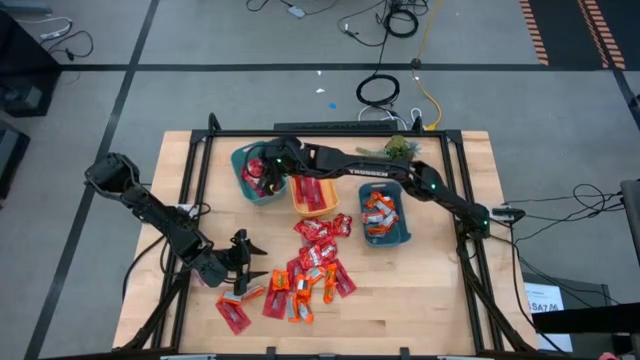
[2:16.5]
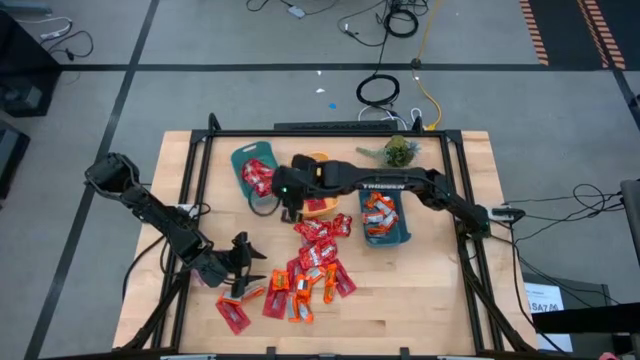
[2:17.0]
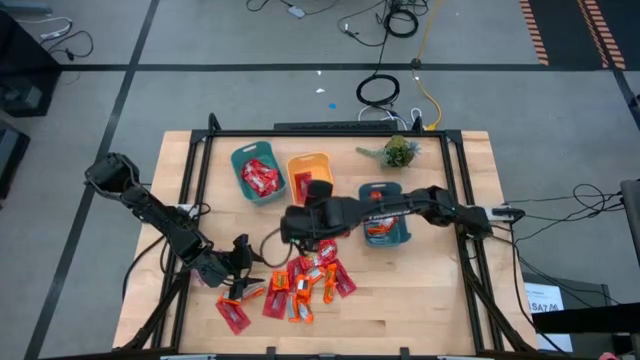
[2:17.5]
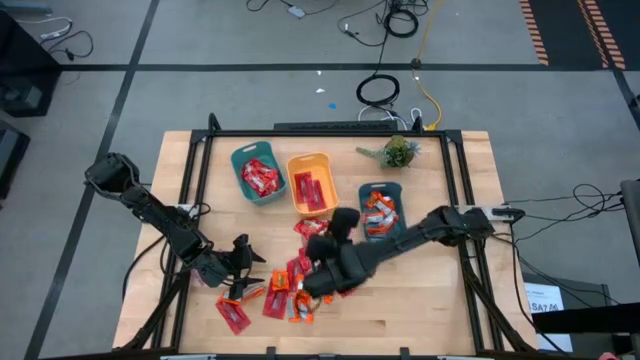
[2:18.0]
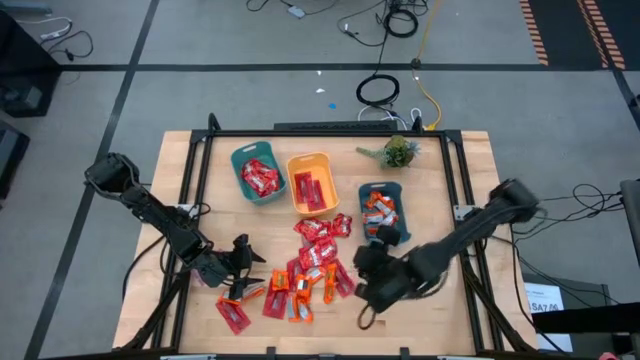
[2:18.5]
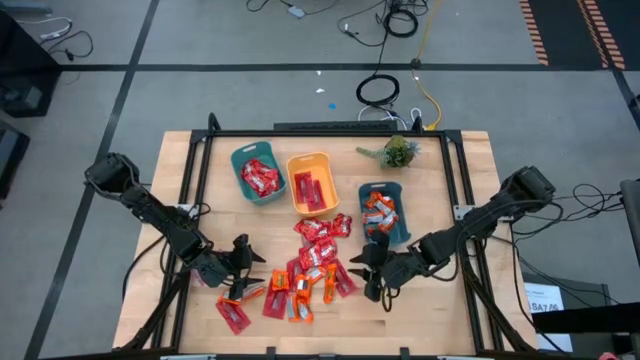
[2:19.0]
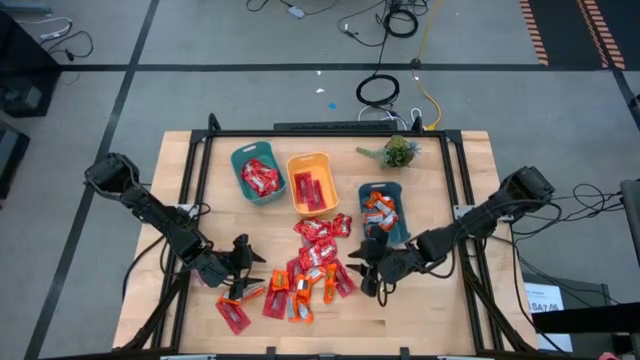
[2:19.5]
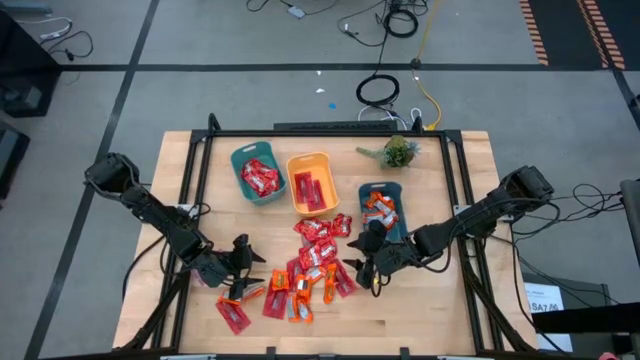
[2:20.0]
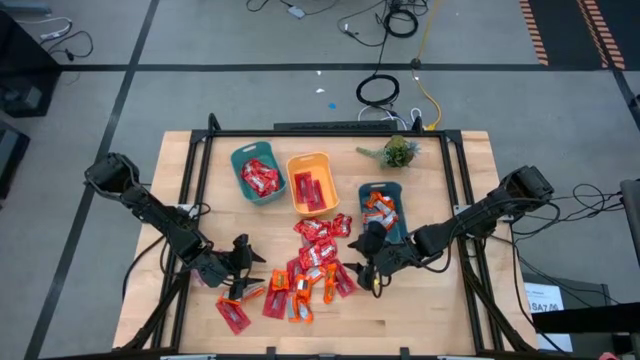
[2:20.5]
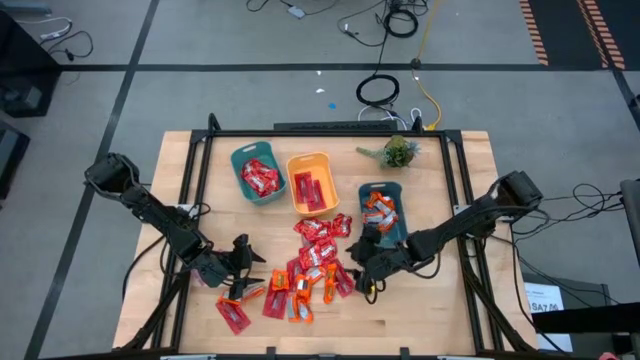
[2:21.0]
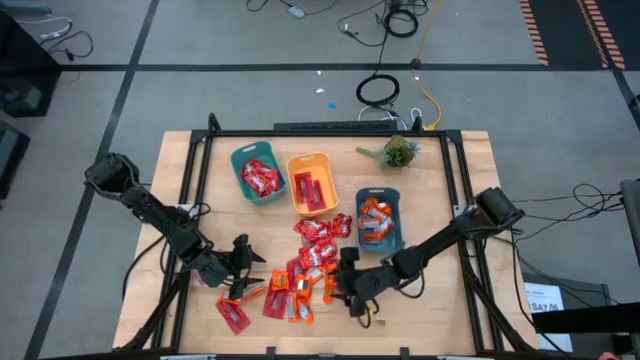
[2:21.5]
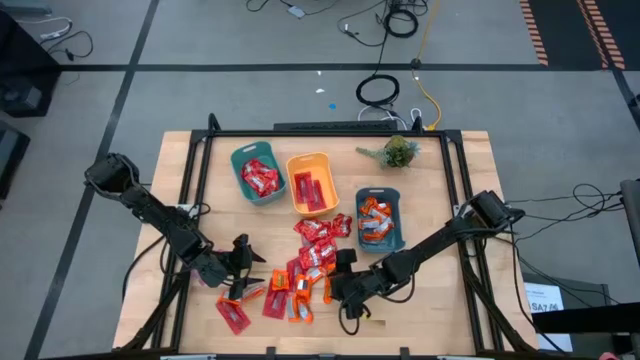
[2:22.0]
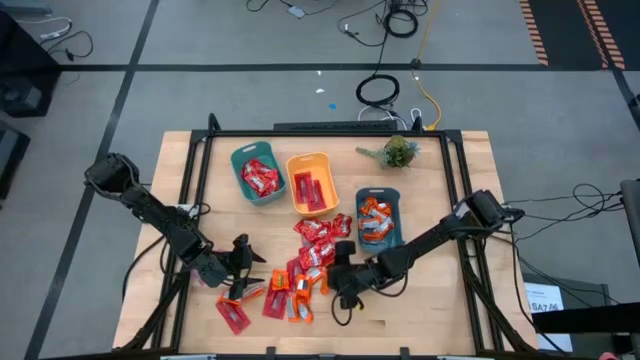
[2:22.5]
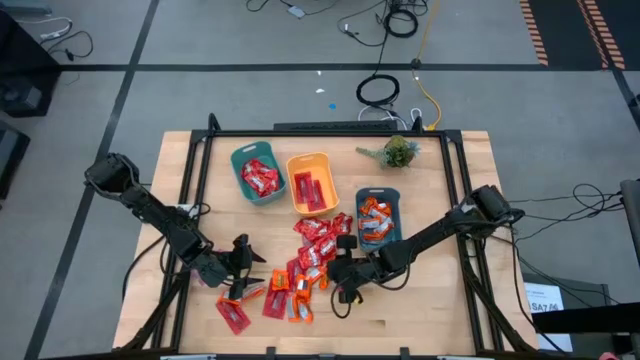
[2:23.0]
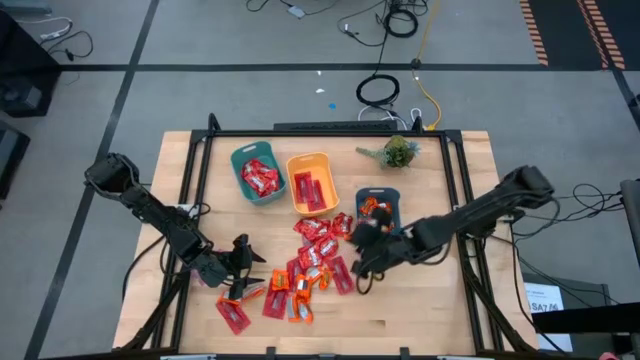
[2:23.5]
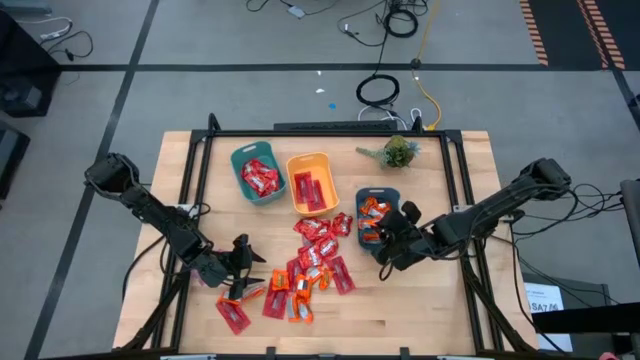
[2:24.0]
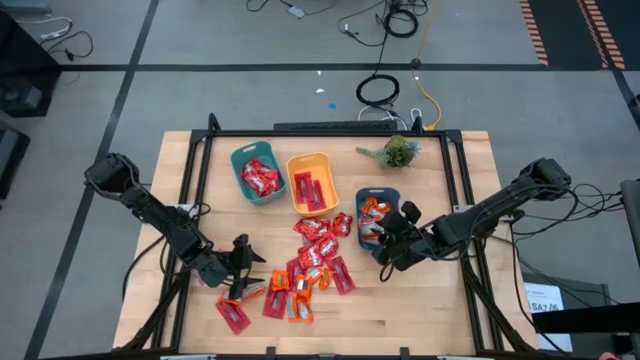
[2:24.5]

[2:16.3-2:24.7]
Task: Sort candy
Put the orange wrapper chocolate into the dark blue bin

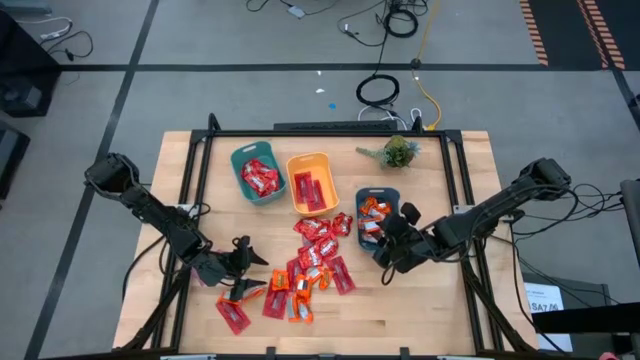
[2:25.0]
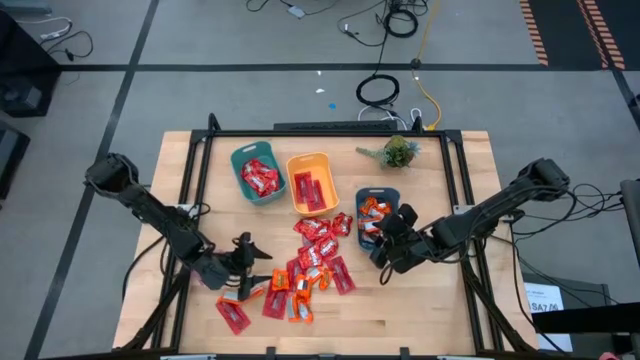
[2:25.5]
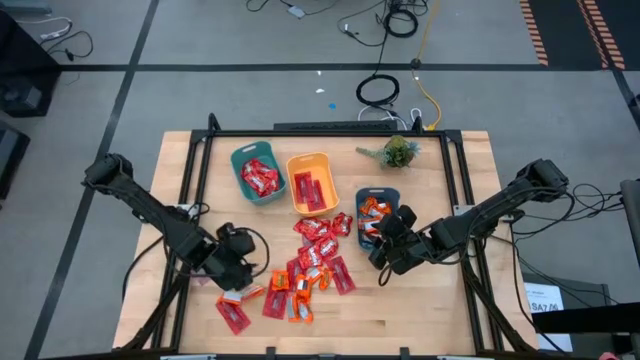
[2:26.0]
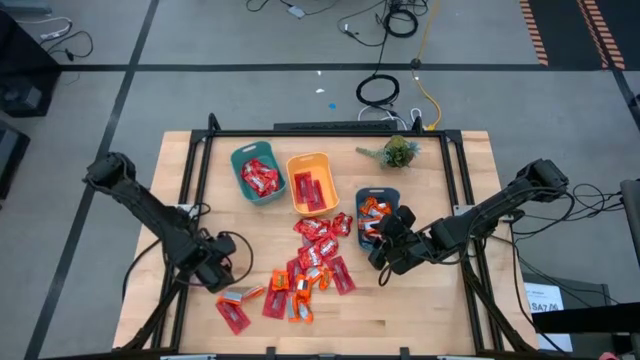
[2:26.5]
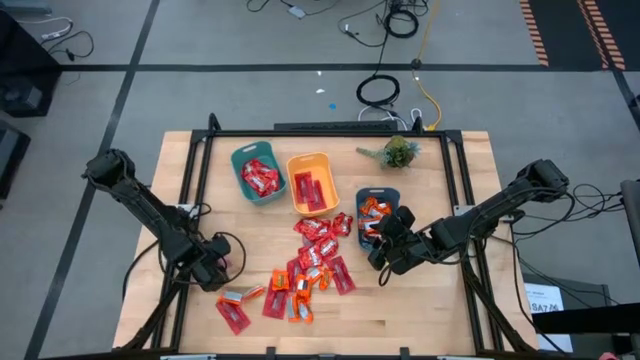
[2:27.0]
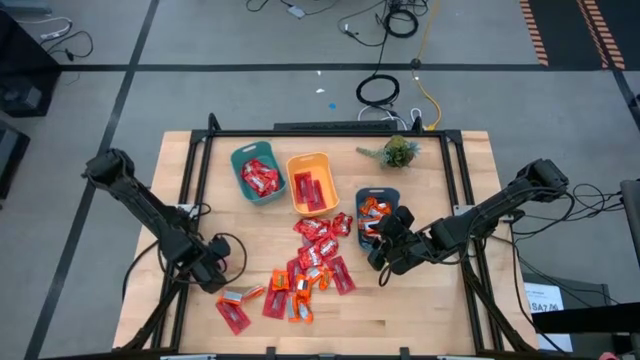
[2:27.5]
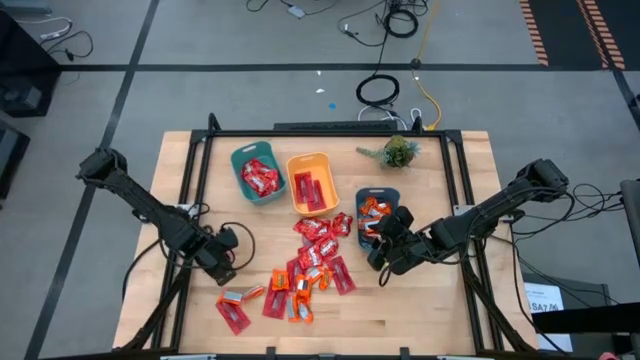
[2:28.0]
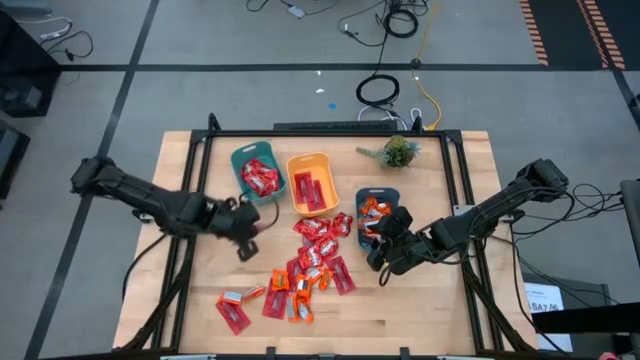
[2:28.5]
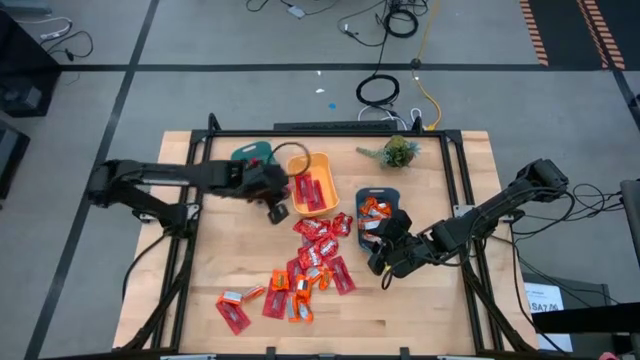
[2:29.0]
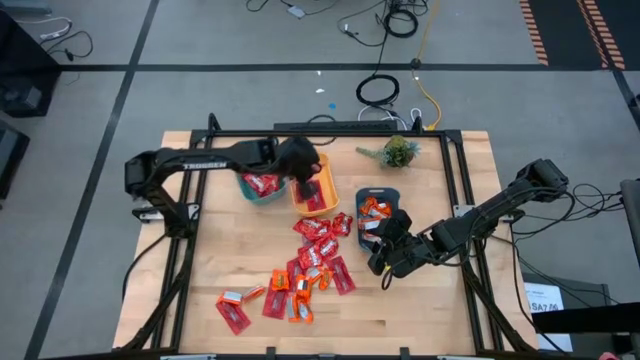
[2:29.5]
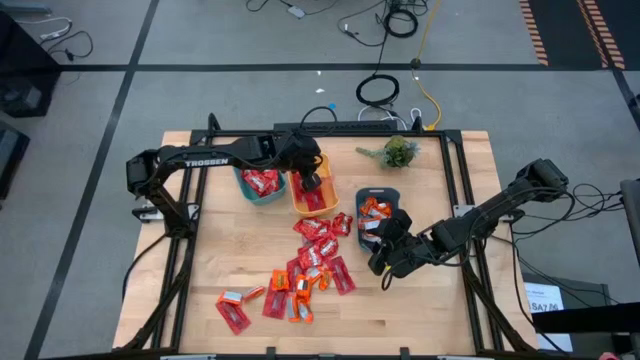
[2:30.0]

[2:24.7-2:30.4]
Put the pink wrapper gummy into the yellow bin

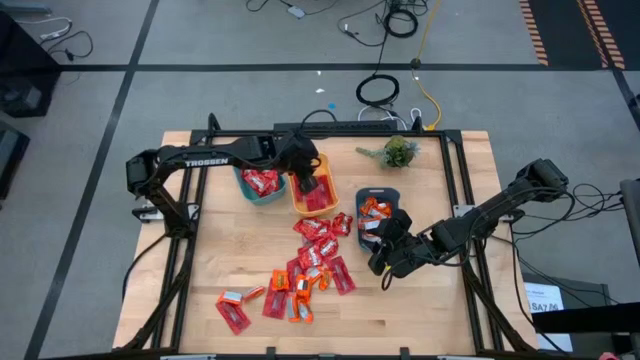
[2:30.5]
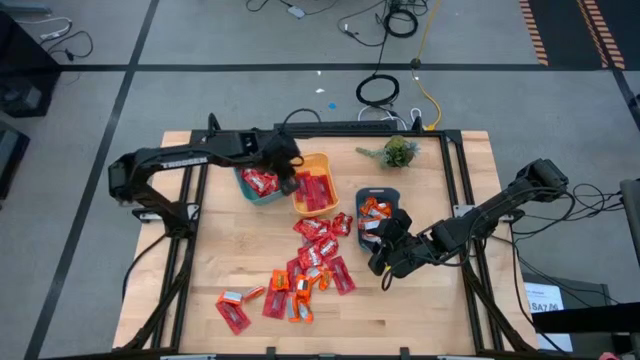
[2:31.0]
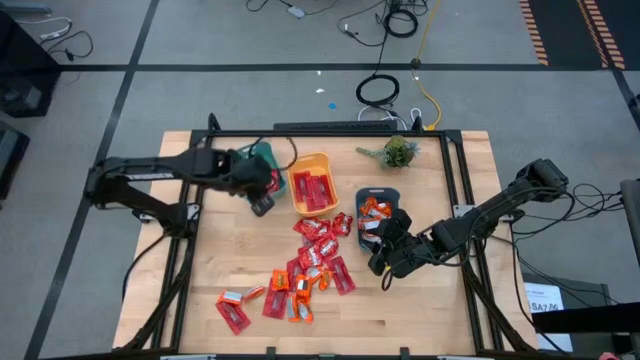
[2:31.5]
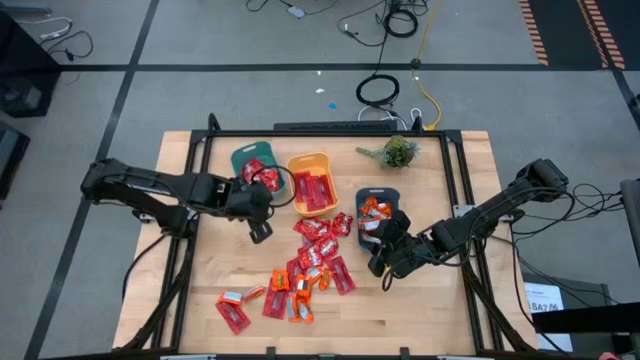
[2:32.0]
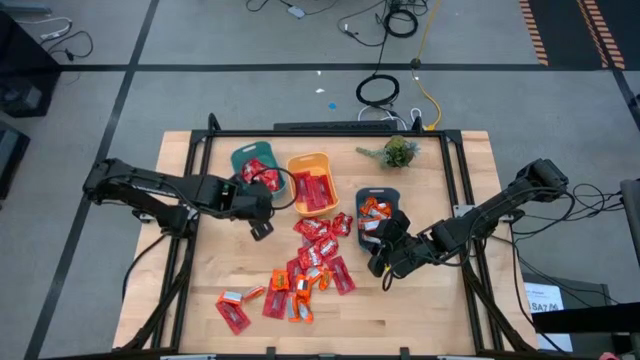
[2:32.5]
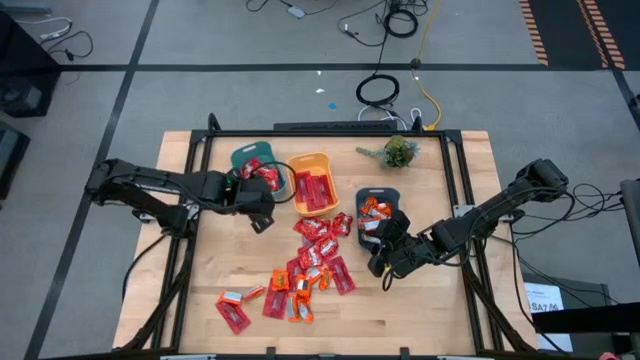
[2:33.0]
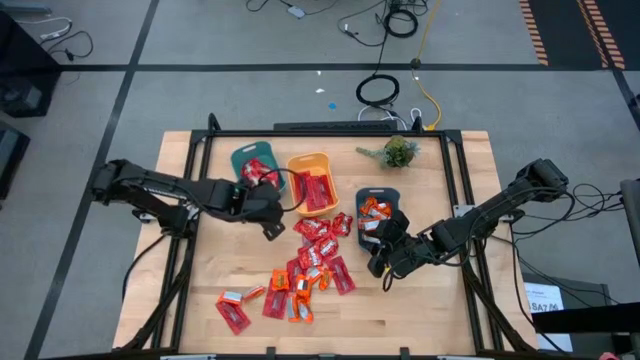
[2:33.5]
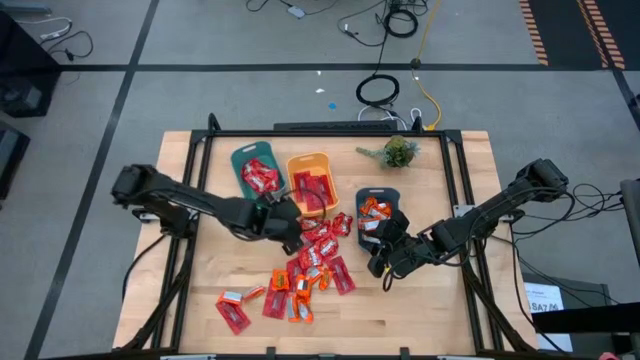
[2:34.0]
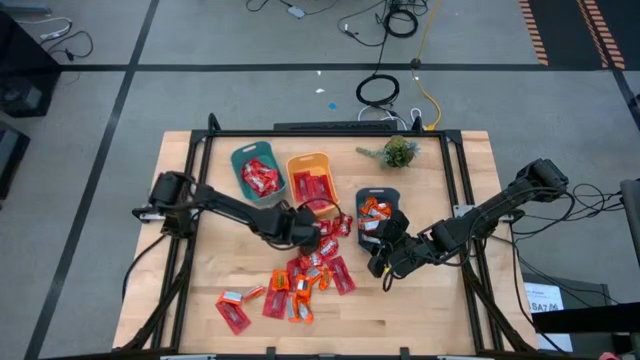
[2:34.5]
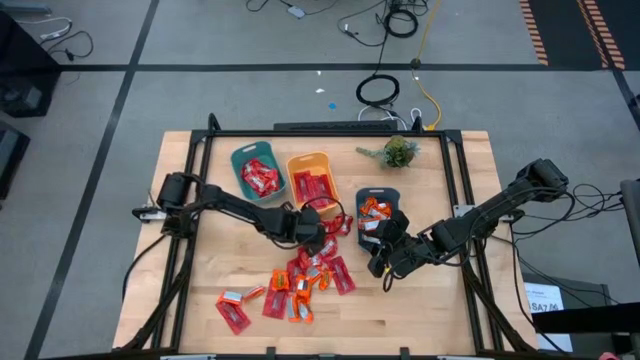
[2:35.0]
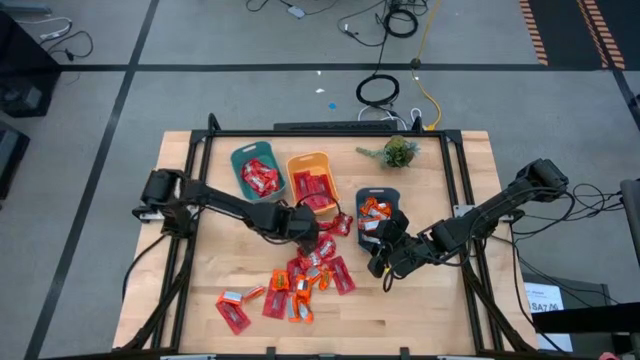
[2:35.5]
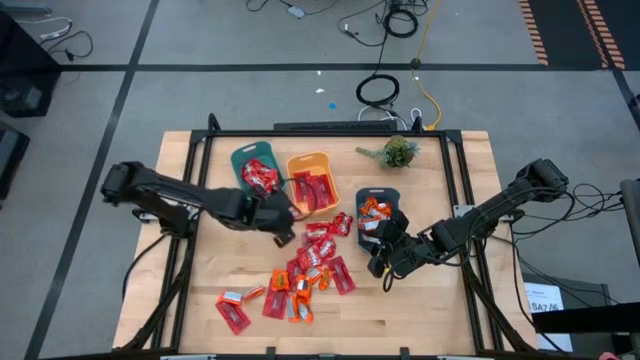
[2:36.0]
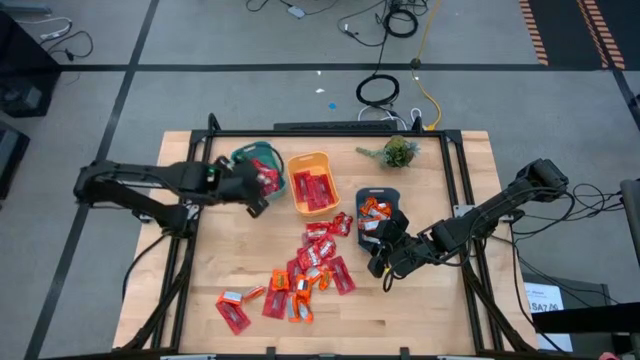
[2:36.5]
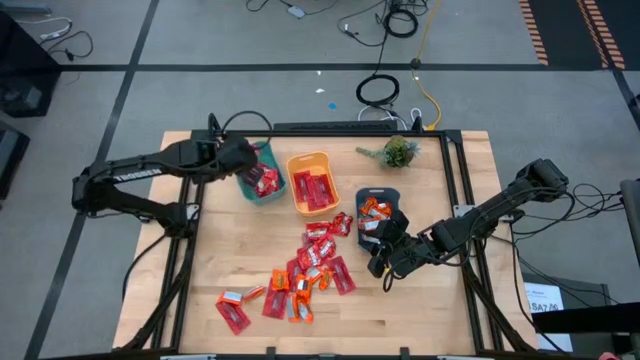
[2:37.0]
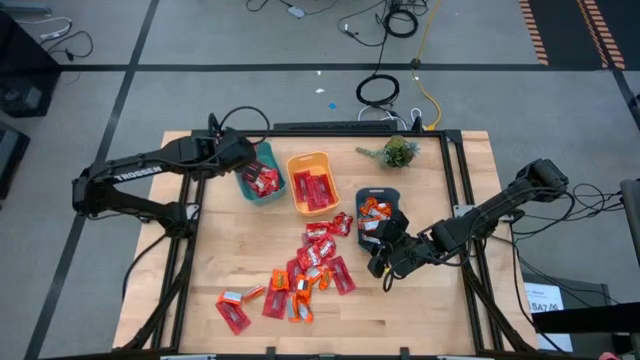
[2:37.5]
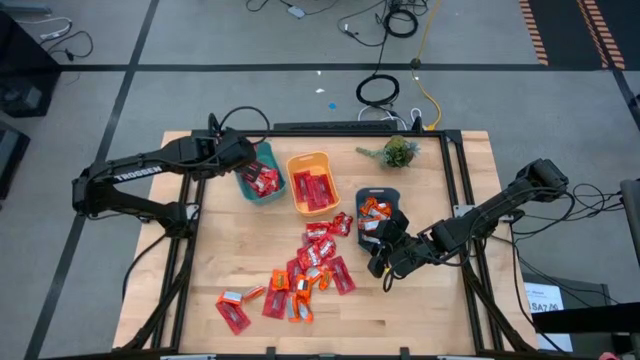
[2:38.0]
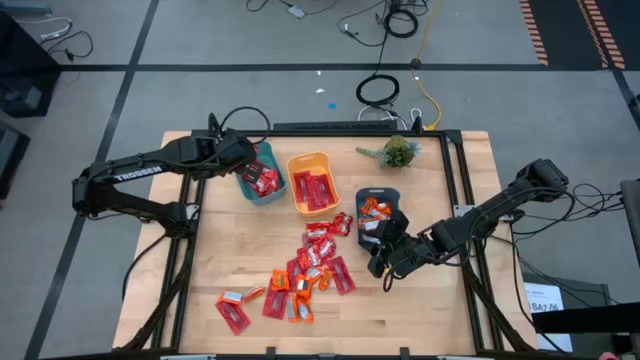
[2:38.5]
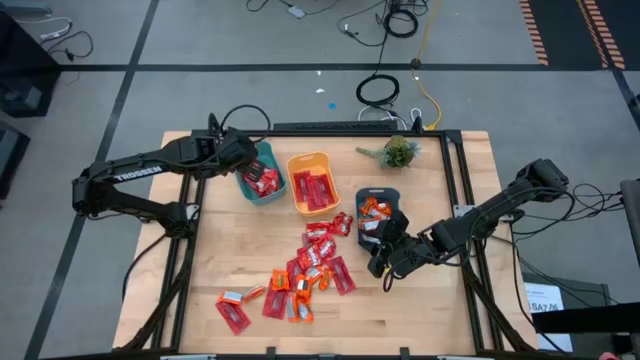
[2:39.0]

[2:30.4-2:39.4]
Put the red pack of candy into the light blue bin
